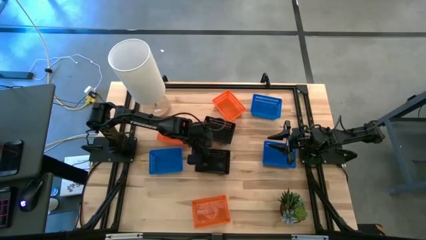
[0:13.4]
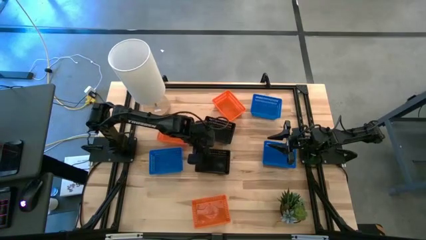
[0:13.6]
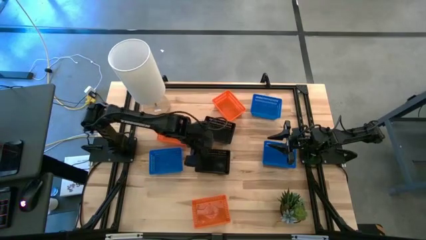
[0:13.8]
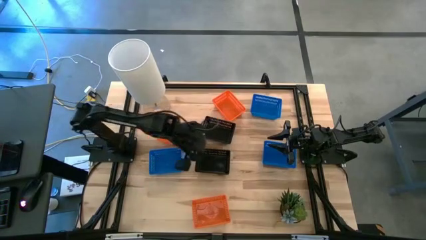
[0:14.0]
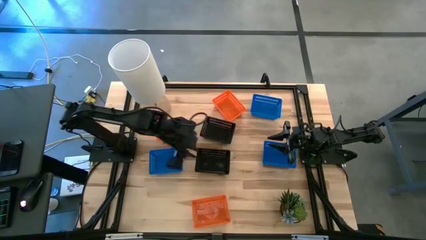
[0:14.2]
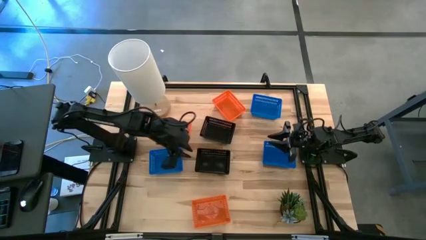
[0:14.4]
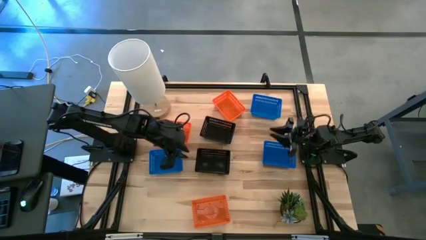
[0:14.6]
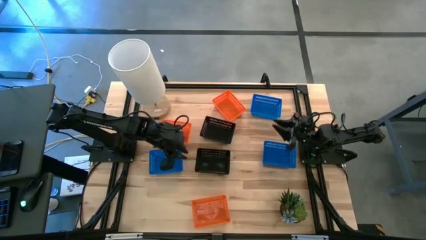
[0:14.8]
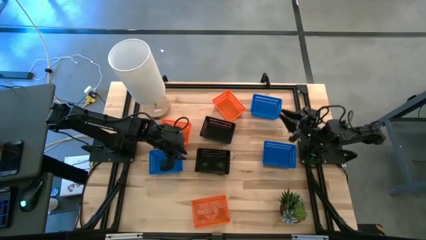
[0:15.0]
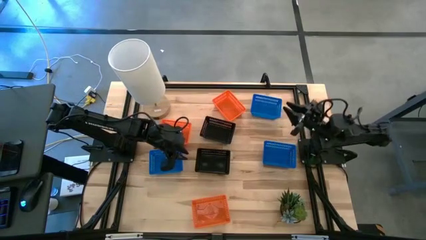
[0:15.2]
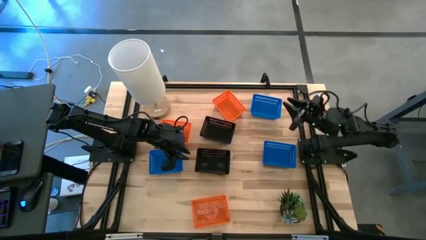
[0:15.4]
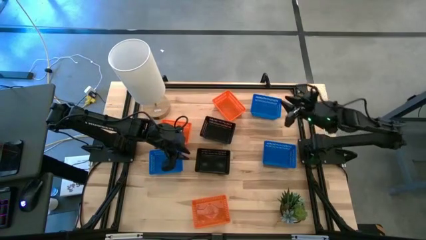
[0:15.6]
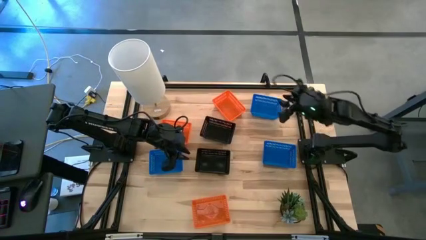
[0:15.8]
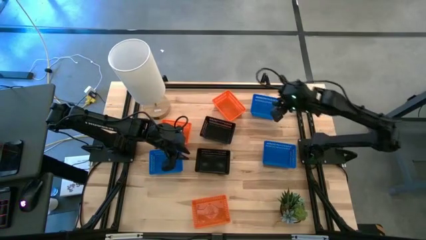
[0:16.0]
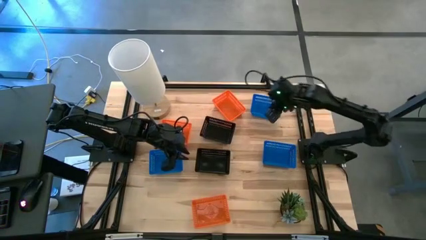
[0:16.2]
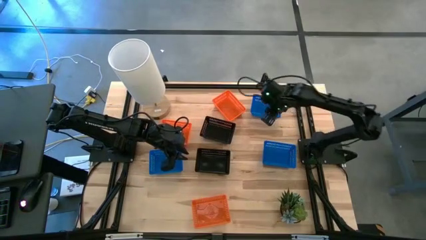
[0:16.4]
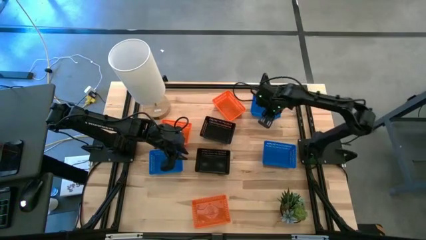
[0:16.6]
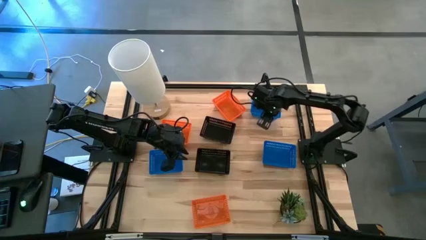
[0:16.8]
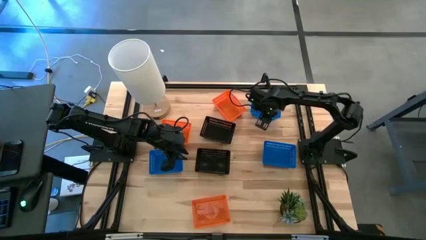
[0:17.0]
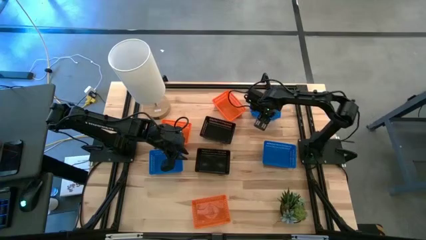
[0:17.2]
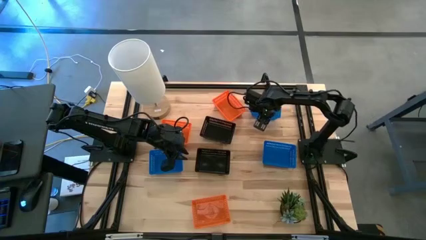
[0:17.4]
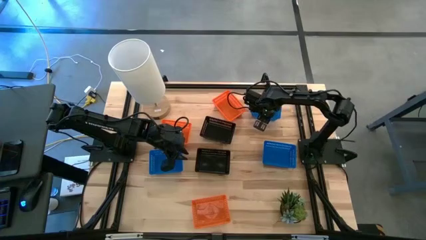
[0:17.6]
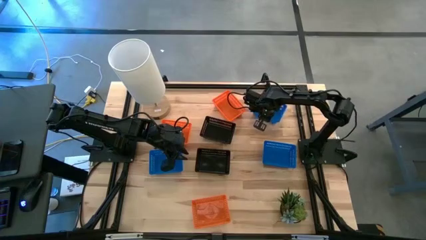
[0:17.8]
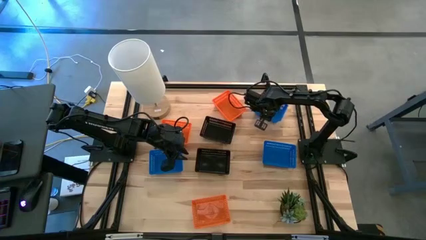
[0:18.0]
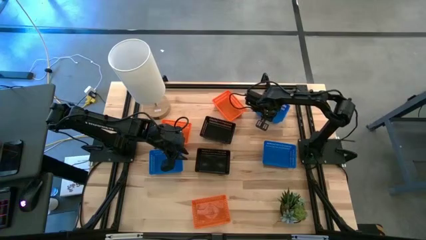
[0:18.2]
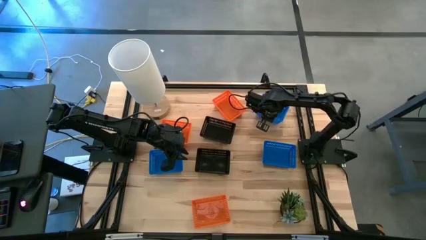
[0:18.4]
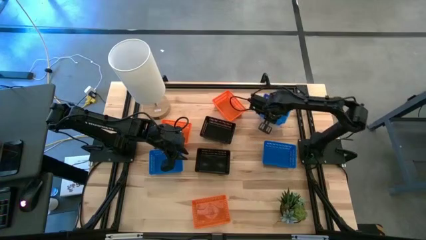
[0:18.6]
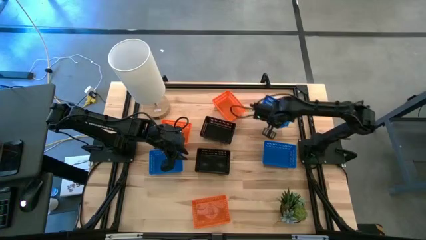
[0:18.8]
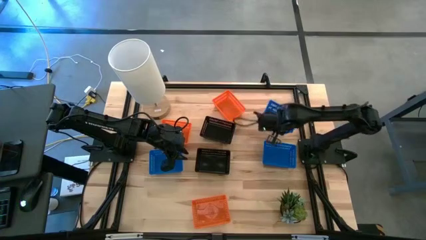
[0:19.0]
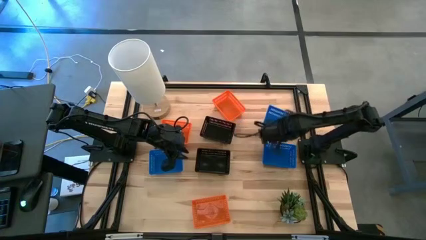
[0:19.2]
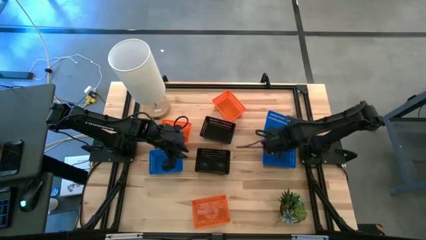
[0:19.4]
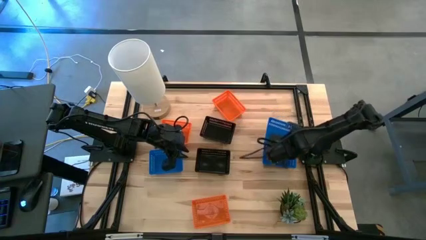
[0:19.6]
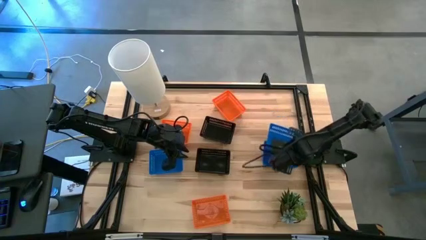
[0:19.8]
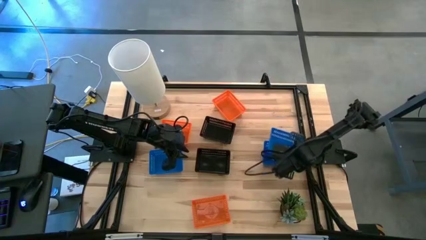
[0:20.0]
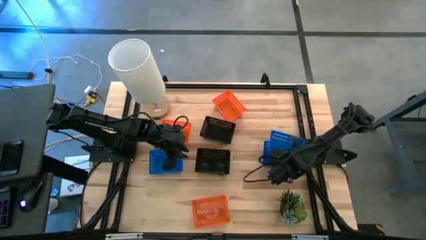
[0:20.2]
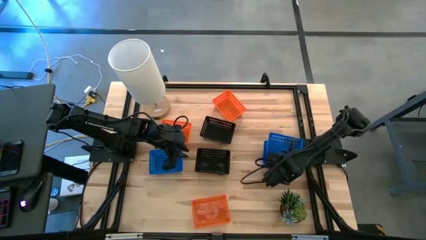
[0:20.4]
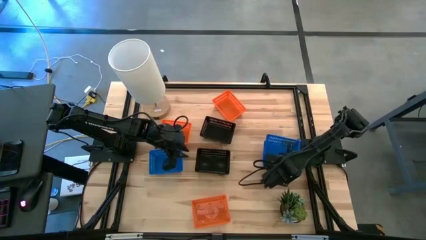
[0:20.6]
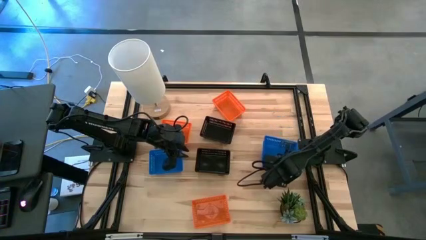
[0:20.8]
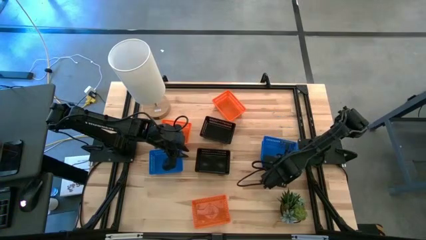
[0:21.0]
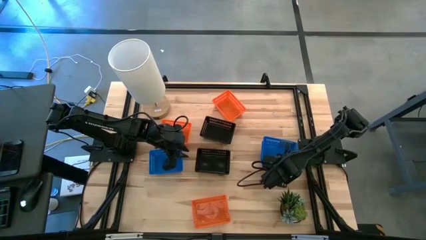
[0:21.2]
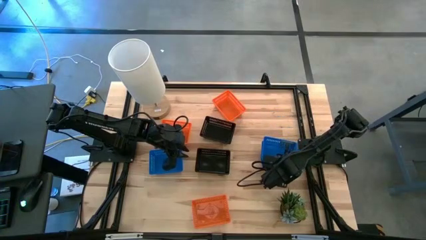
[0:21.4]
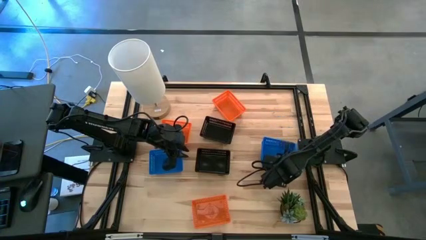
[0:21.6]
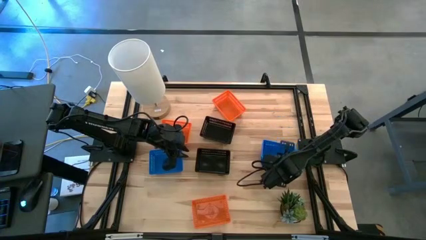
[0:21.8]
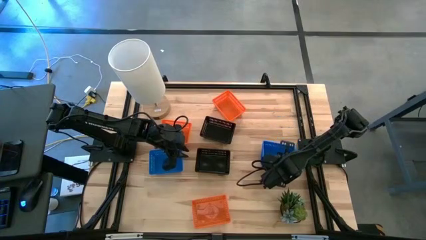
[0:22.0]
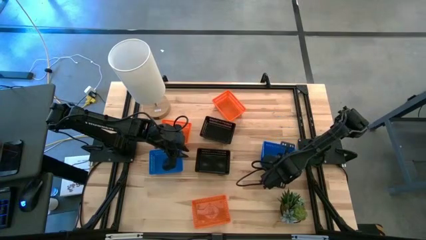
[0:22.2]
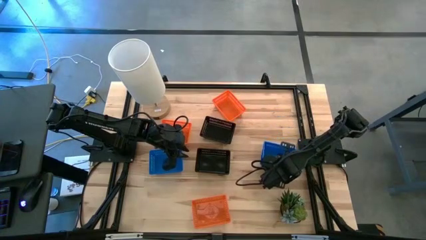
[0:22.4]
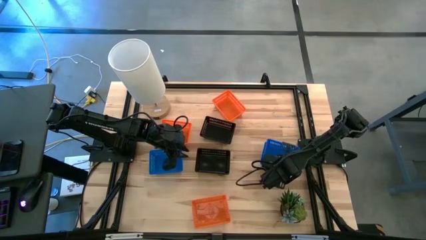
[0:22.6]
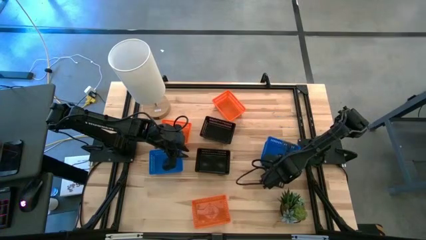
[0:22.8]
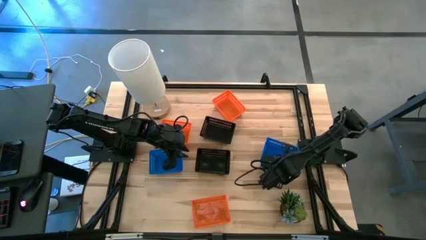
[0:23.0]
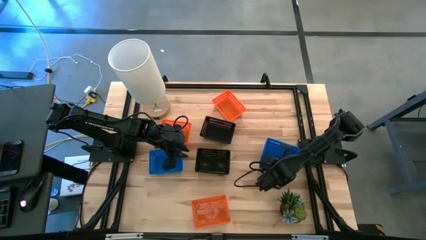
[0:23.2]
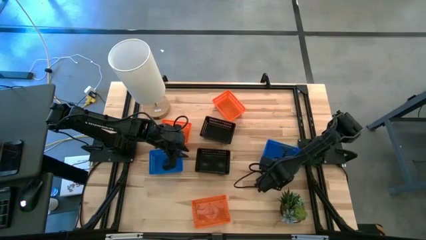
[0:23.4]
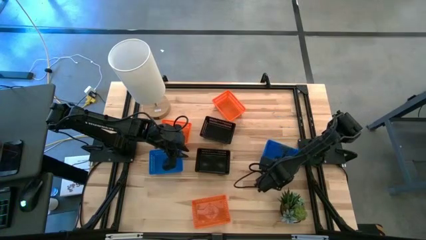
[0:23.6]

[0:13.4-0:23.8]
Stack the top right blue bin on the bottom right blue bin

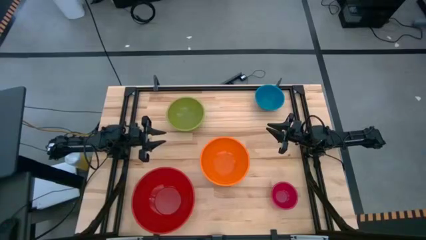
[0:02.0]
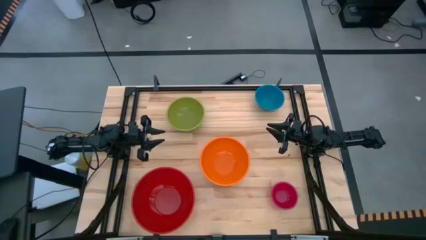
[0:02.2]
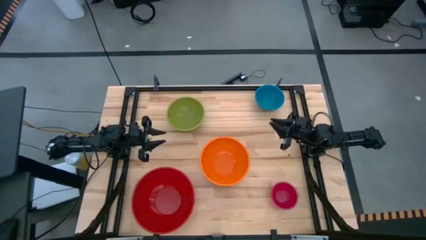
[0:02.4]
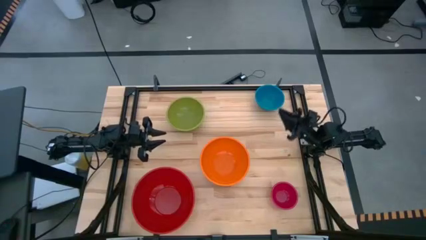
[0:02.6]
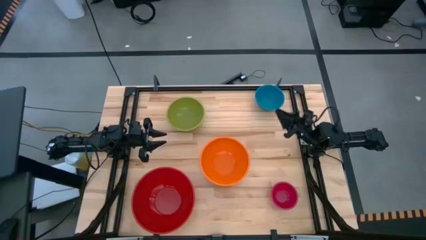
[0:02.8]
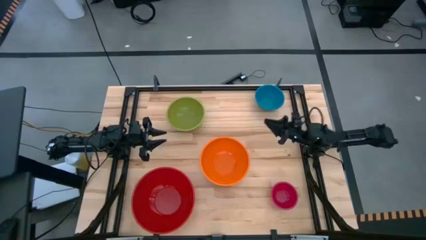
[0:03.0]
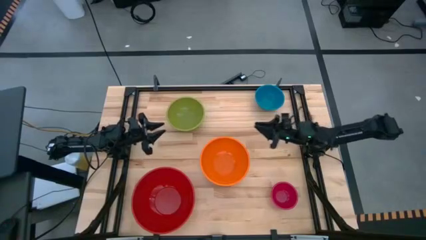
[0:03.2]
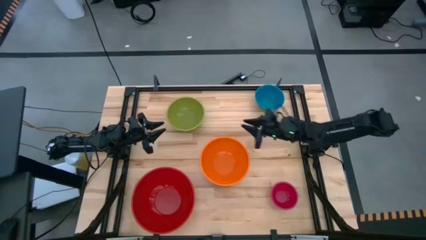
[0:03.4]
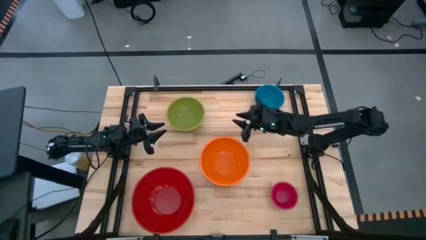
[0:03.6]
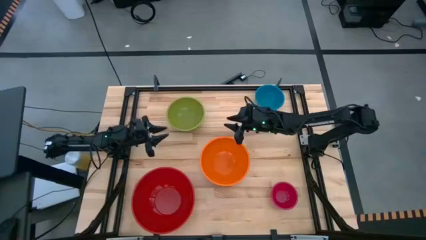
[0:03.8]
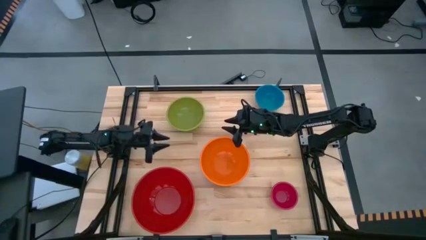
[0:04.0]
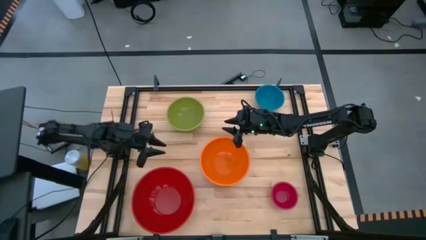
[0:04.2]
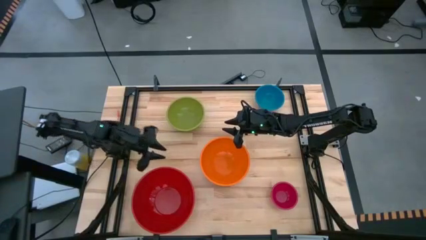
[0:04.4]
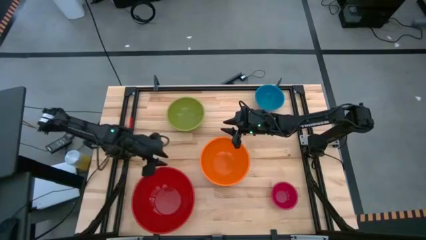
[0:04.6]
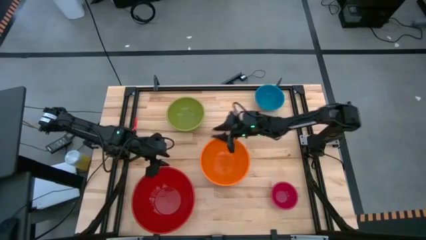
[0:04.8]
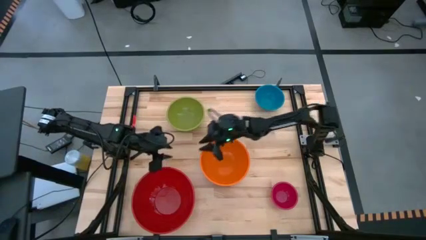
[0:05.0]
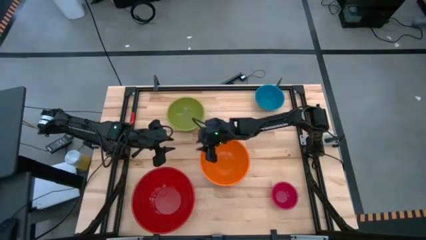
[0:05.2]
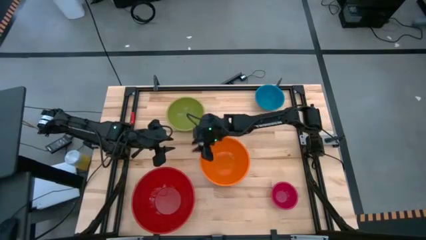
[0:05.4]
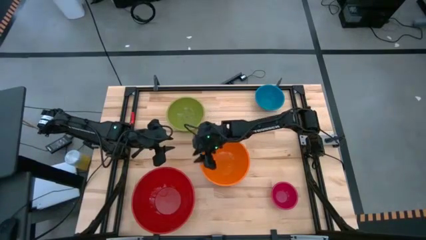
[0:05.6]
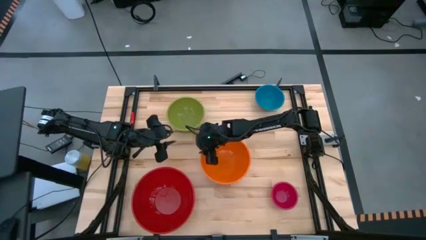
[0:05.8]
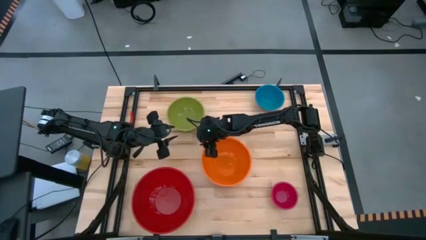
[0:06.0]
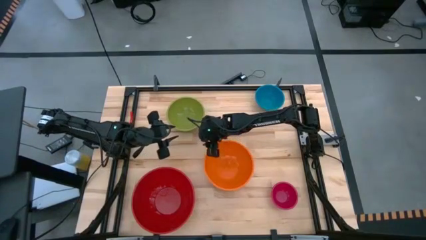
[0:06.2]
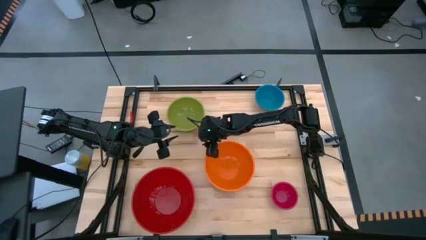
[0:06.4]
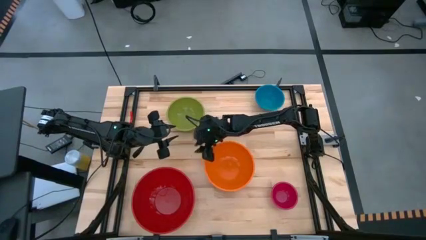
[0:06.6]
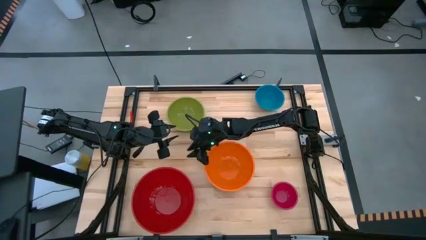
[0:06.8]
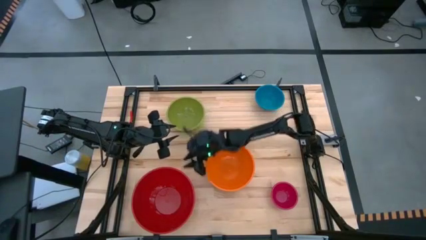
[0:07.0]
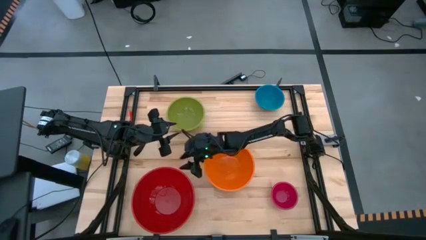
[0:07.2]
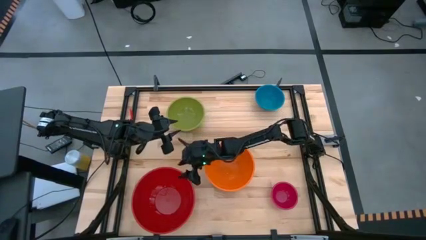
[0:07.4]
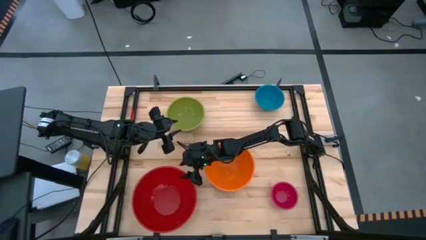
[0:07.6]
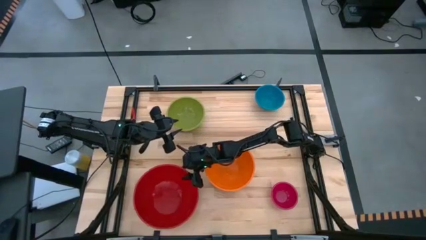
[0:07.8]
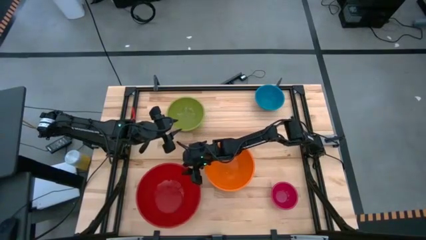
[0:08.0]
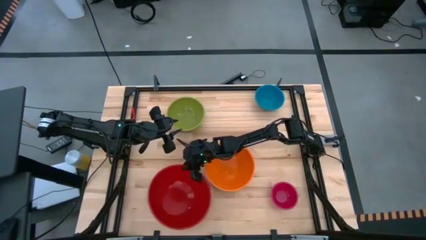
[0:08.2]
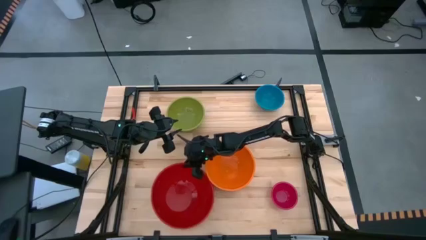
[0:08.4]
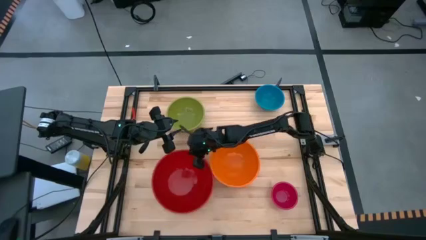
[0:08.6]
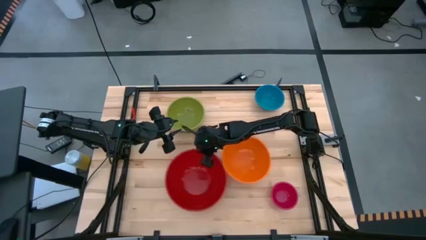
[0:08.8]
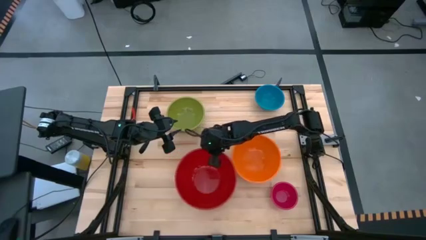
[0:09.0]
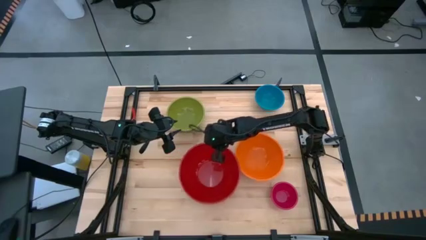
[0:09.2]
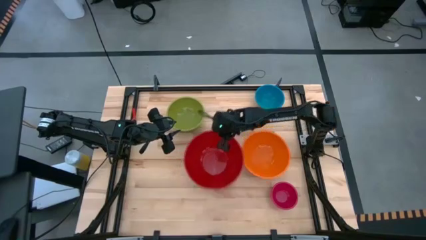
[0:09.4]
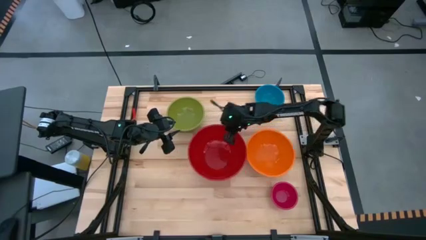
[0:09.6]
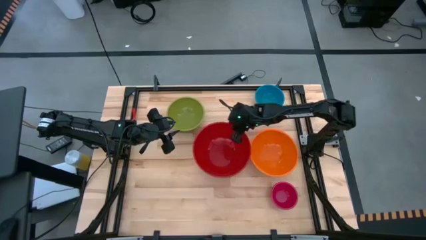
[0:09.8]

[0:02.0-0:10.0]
Move the red bowl to the center of the table
